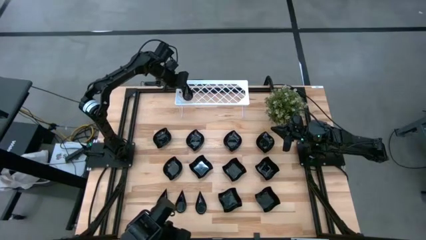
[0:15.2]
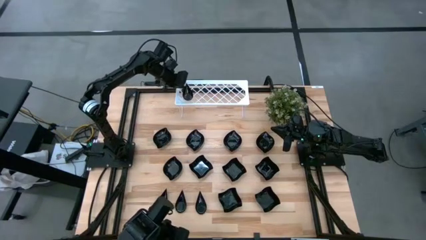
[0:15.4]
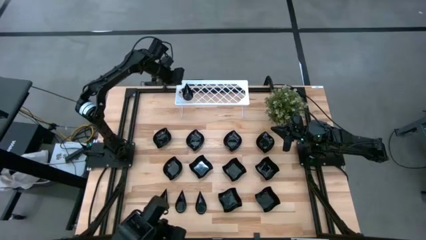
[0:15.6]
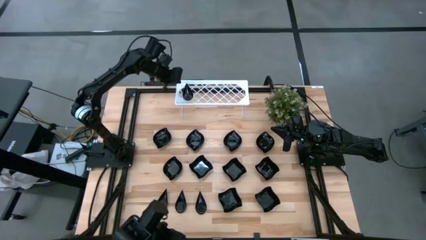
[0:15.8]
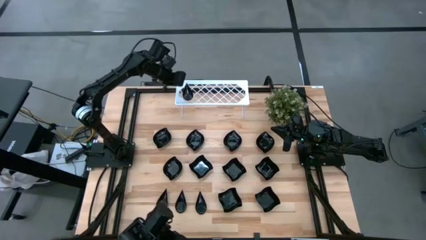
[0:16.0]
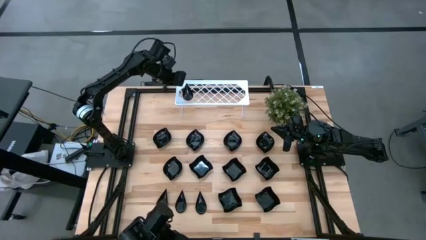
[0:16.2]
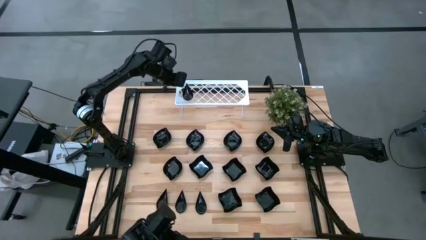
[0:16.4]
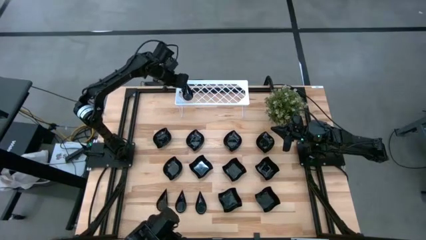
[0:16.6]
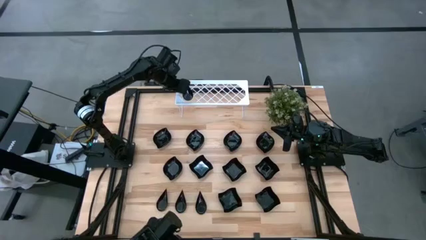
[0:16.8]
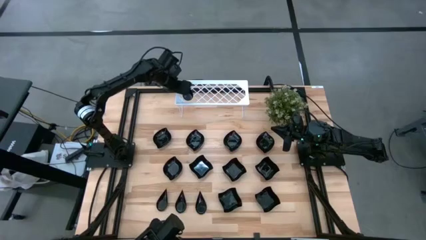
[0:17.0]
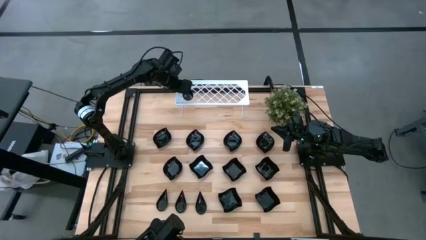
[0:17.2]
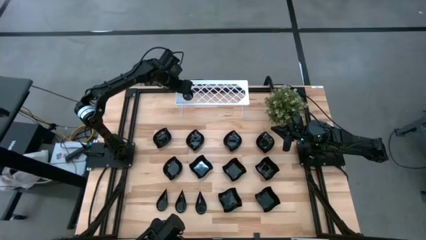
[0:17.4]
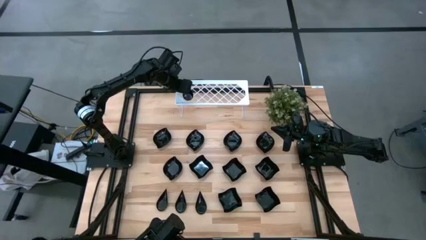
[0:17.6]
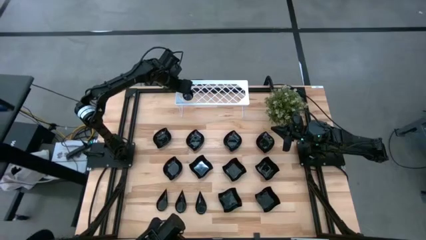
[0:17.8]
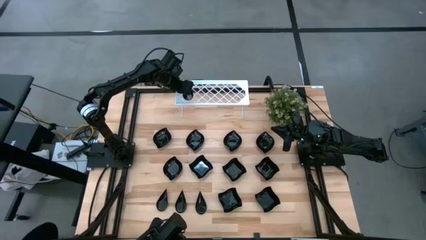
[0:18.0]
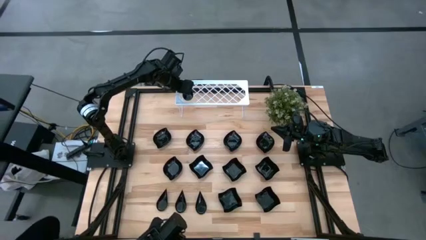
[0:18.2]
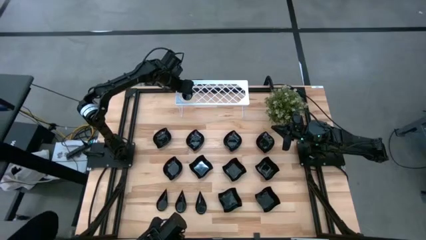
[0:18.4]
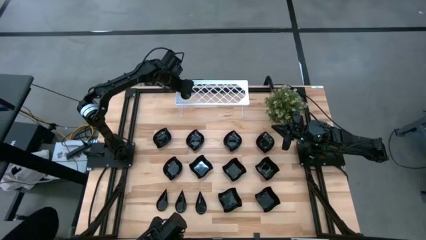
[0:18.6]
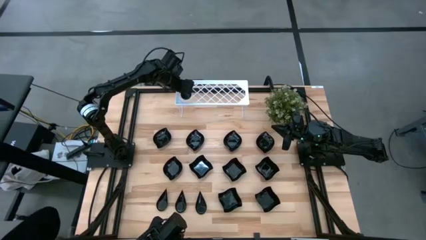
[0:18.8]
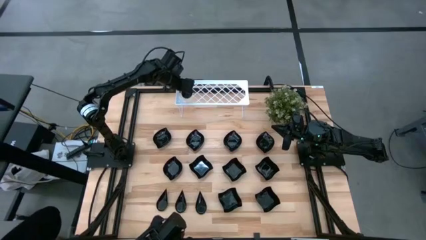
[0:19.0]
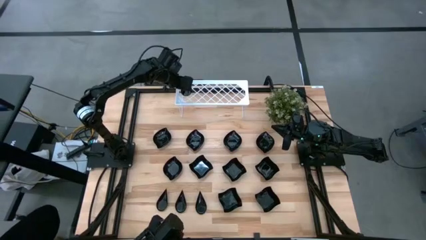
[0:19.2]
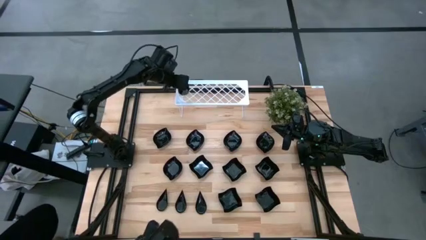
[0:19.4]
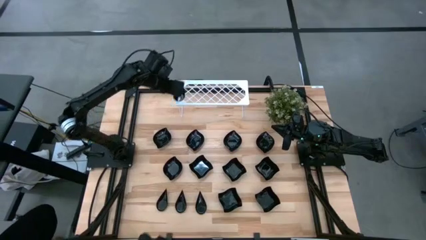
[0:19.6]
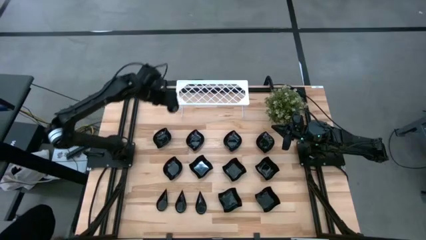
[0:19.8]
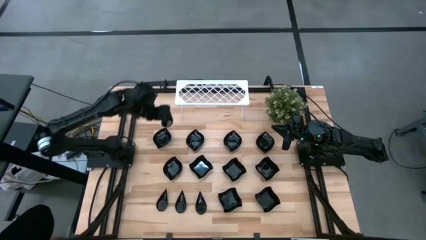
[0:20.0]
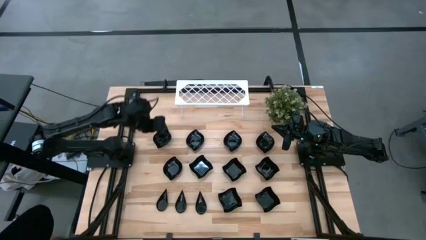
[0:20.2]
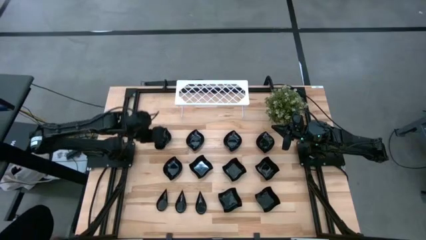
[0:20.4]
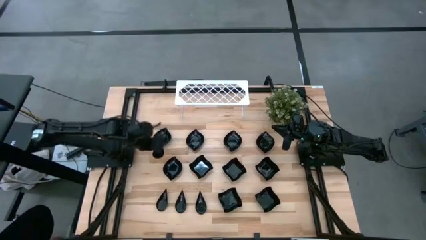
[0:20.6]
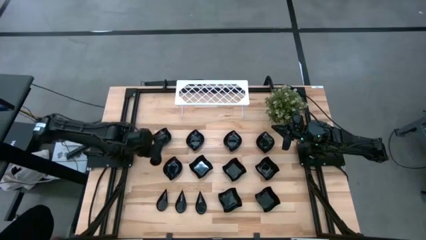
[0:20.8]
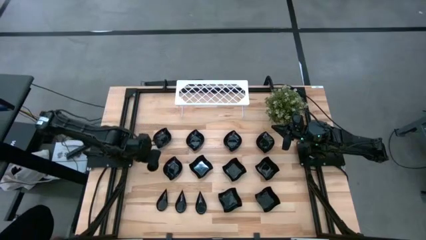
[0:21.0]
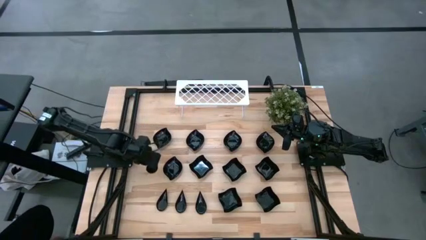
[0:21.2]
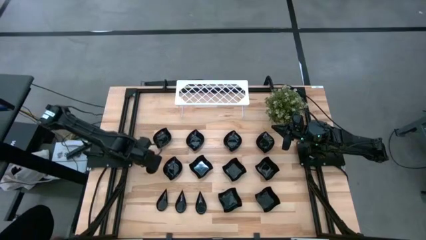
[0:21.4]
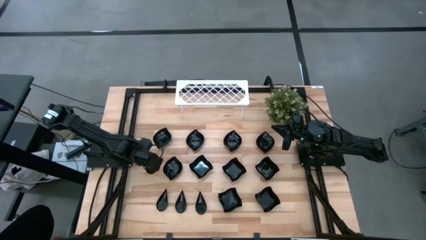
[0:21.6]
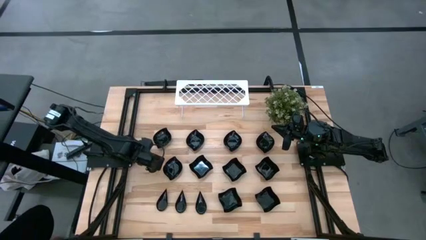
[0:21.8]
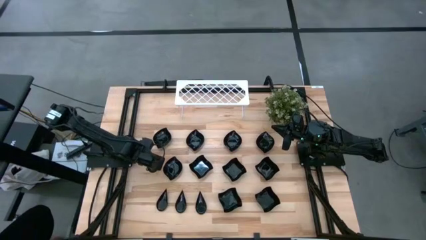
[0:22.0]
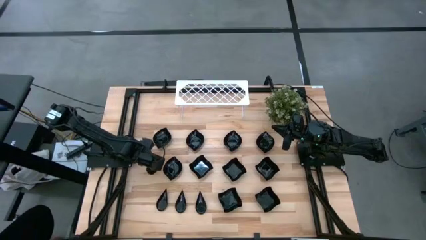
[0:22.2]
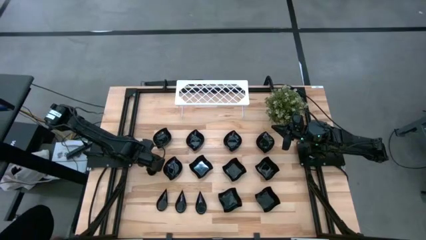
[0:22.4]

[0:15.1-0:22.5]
Task: Pick & Place Mini shaped plates
Remove the black drop shaped plate from the shelf

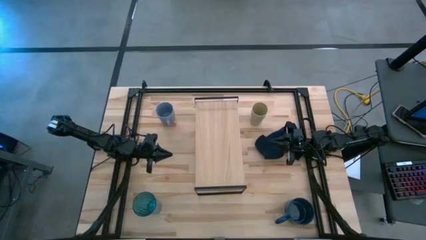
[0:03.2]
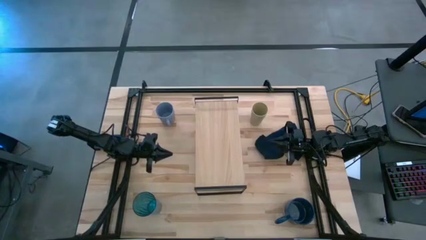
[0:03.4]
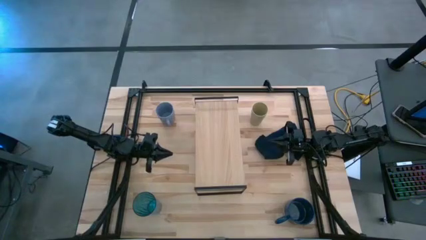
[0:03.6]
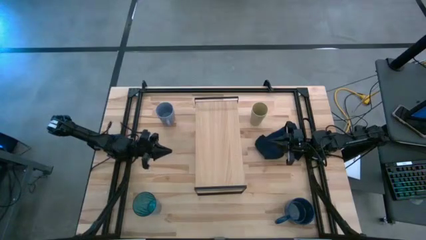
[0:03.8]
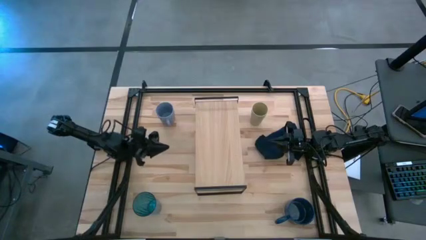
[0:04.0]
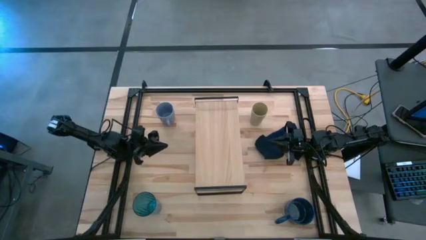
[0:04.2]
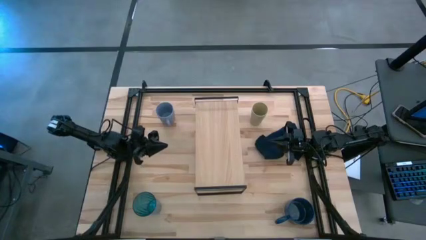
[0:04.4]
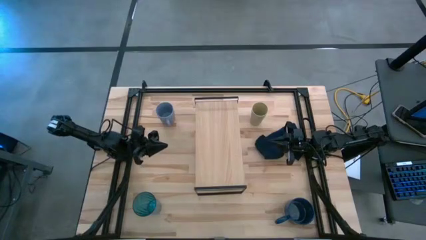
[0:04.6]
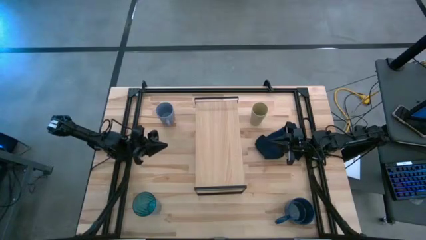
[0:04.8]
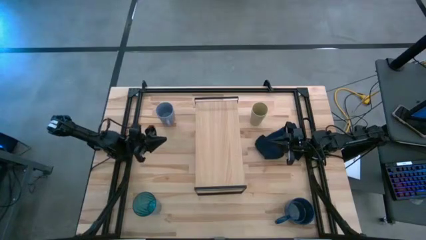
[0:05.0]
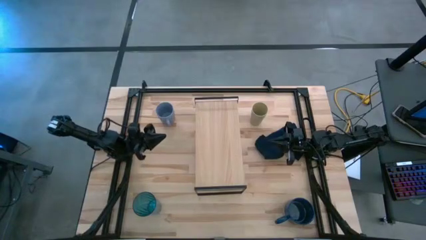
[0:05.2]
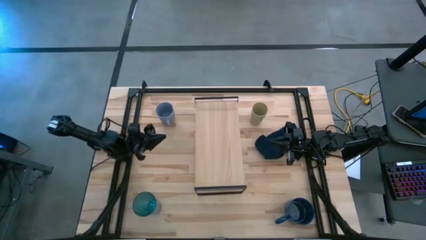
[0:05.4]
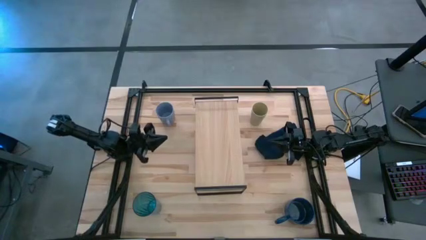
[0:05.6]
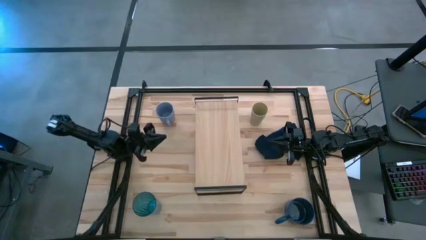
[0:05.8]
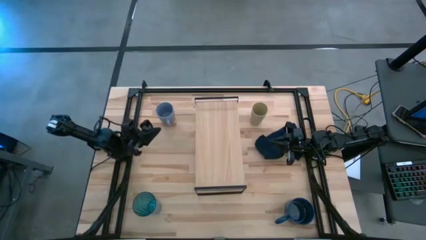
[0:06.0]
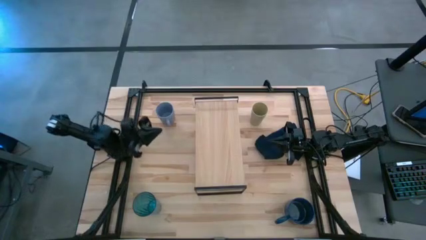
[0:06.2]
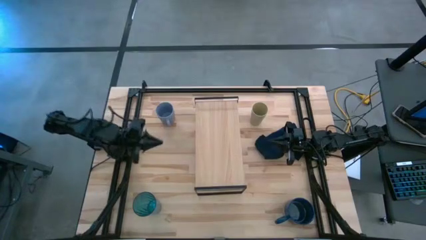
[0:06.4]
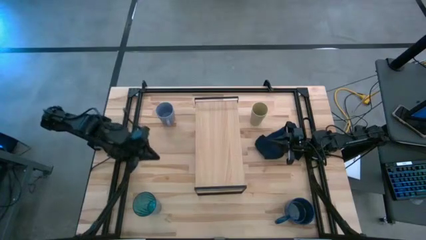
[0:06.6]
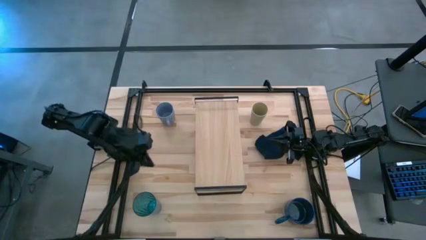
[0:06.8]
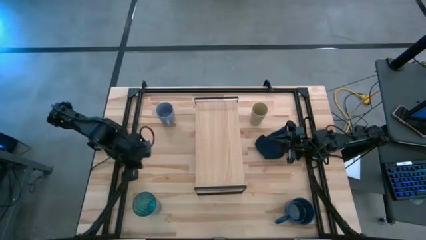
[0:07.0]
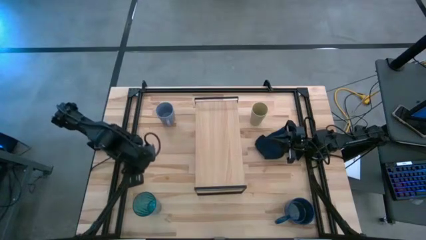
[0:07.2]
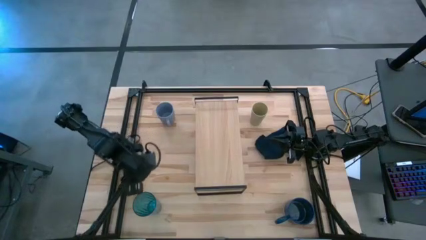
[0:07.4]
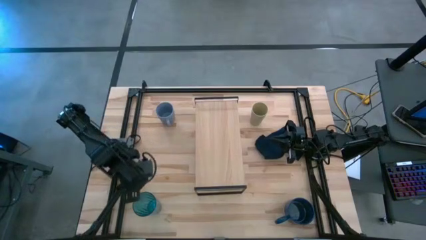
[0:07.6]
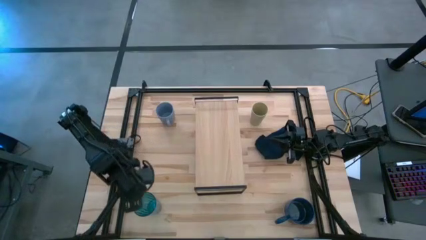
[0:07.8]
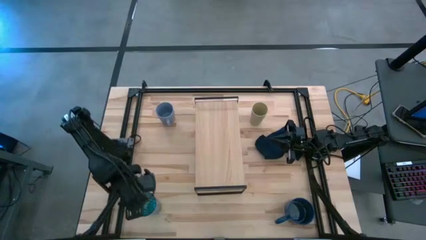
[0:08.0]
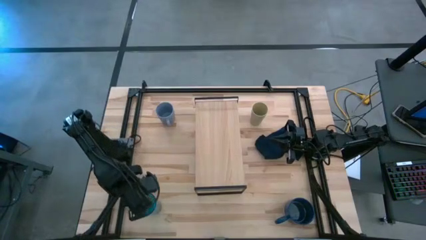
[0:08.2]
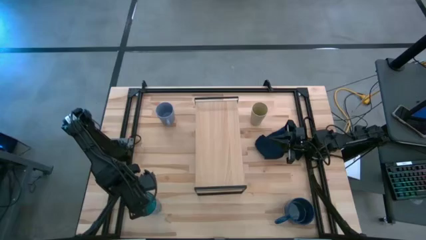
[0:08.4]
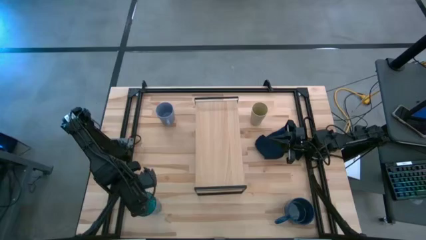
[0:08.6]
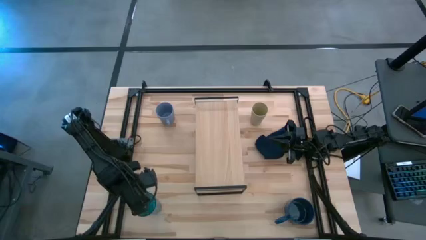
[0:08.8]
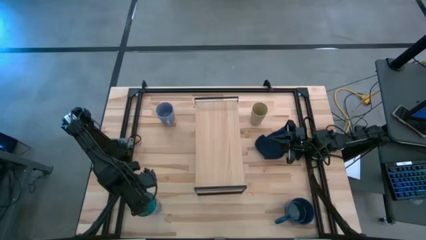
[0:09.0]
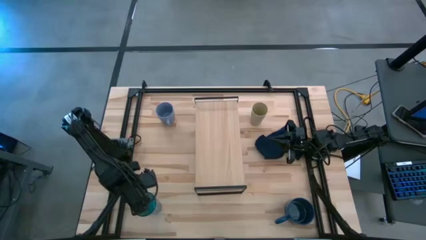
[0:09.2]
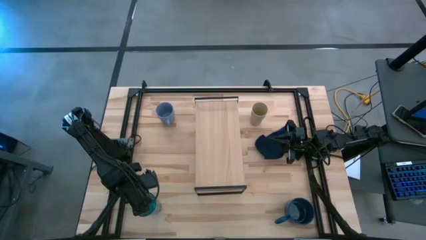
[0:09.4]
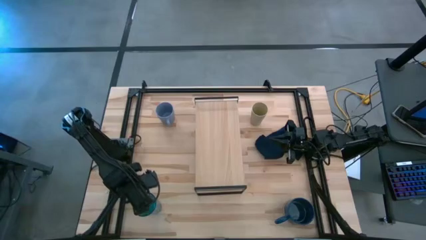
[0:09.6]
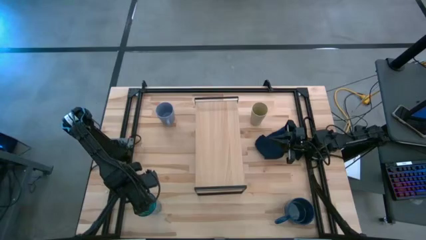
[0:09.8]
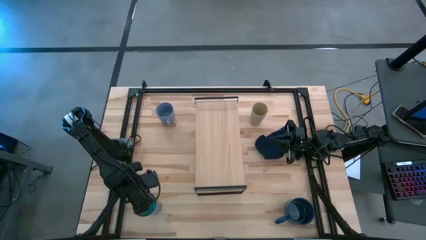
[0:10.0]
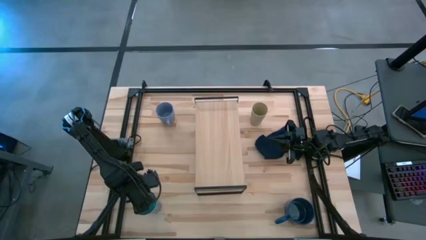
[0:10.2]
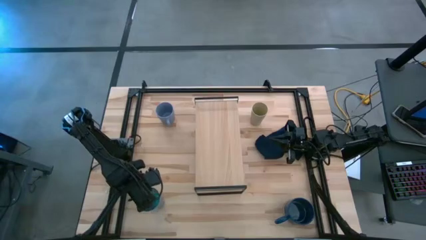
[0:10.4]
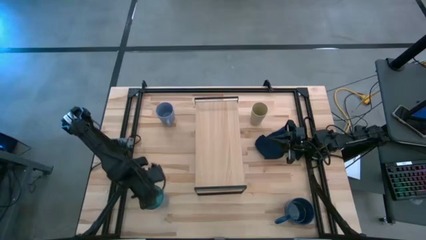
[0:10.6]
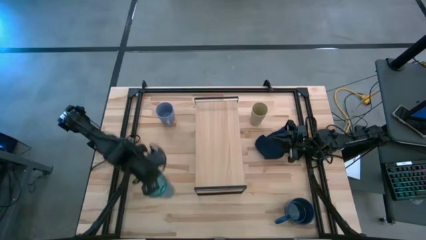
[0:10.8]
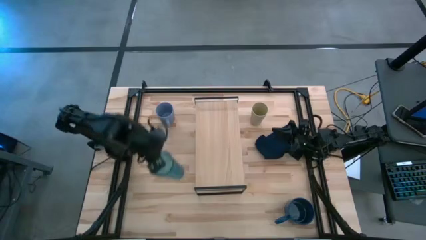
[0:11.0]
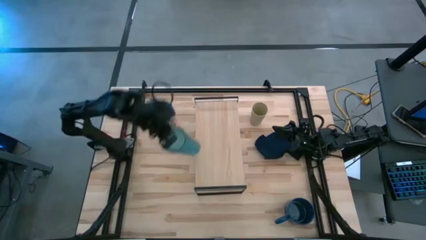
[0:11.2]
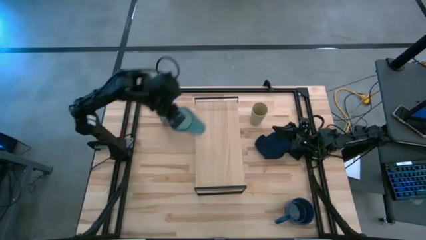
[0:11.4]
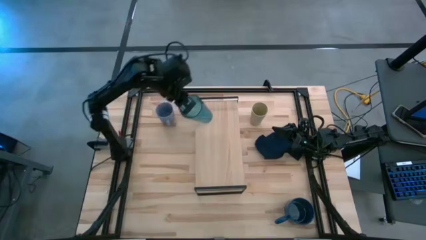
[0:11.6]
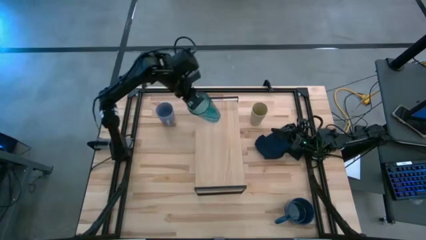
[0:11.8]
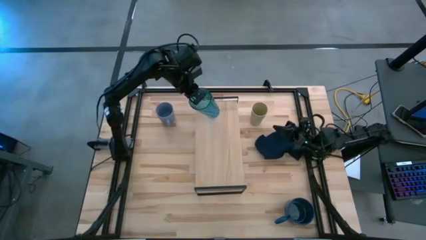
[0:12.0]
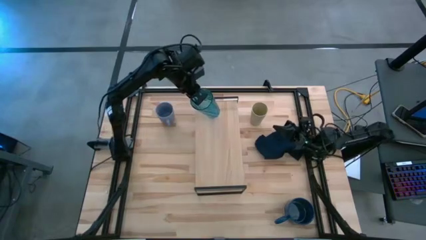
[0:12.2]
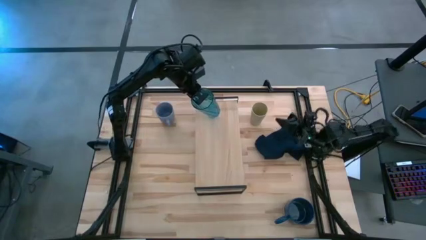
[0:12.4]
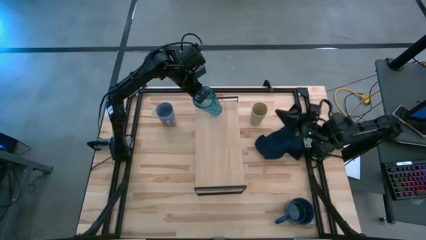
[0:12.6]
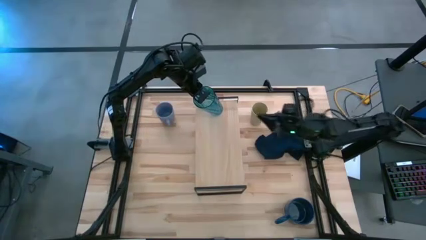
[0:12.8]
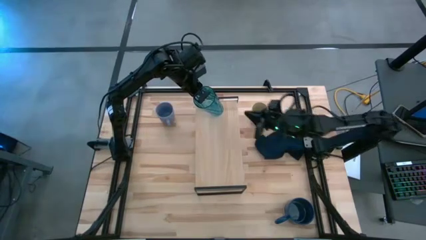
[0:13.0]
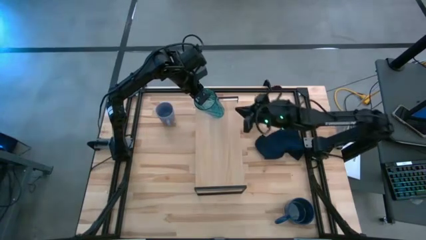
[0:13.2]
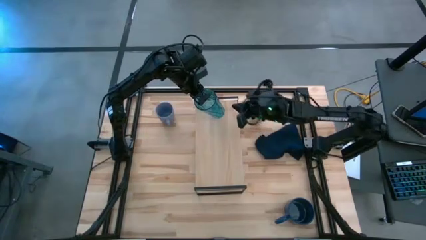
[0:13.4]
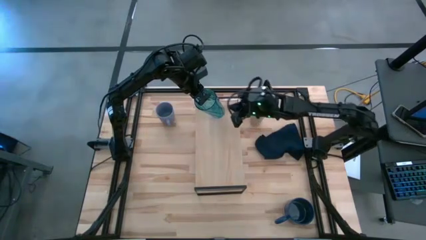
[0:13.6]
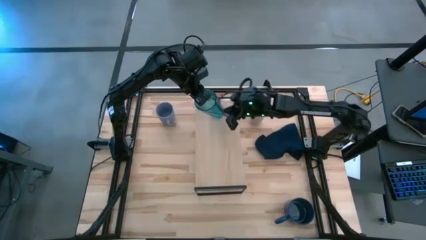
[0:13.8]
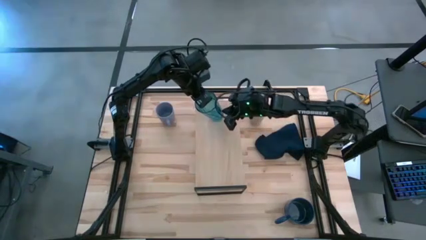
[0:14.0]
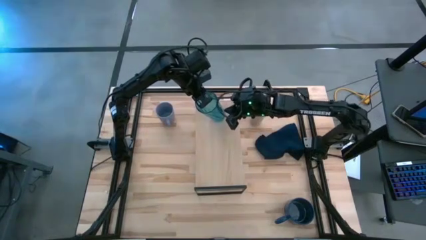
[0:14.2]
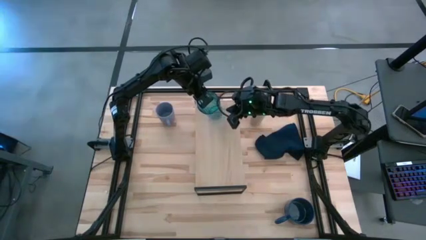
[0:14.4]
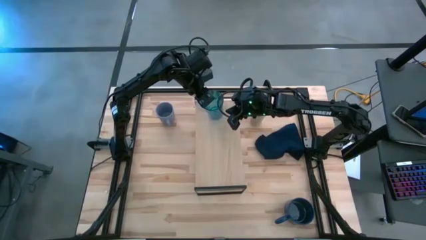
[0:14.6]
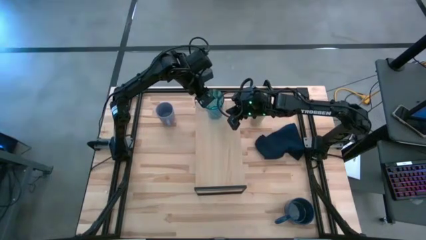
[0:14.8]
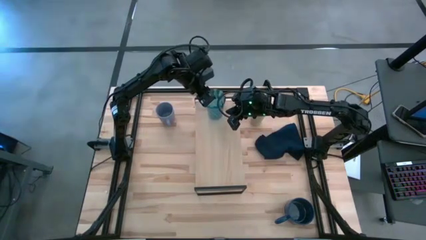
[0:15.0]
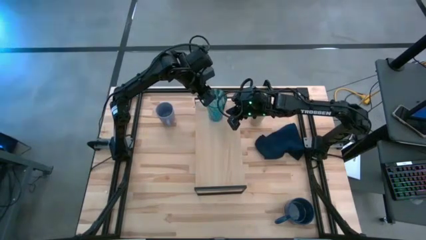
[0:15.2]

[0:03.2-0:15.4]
Task: Stack small to large cups/mugs on shelf
Put the blue cup on the shelf
